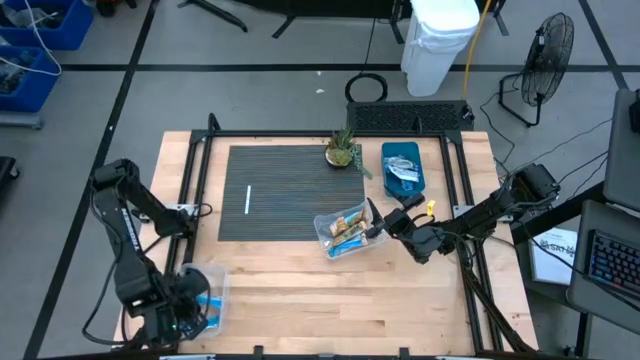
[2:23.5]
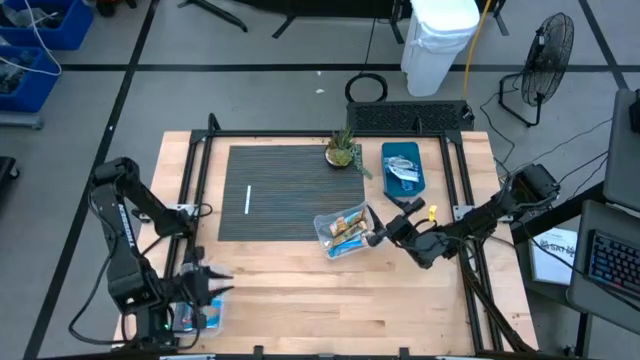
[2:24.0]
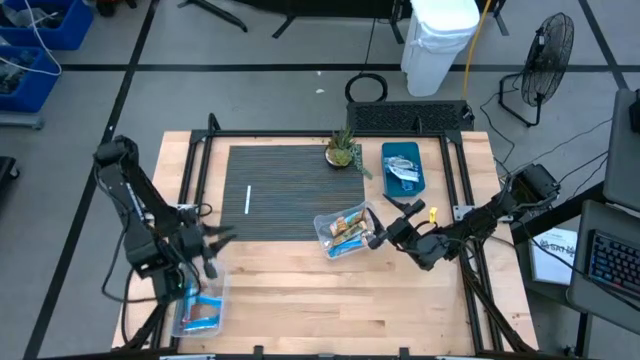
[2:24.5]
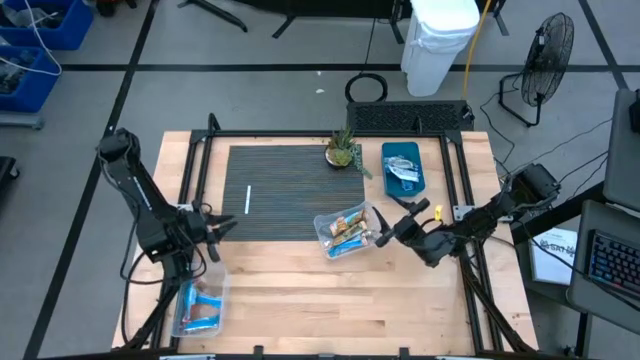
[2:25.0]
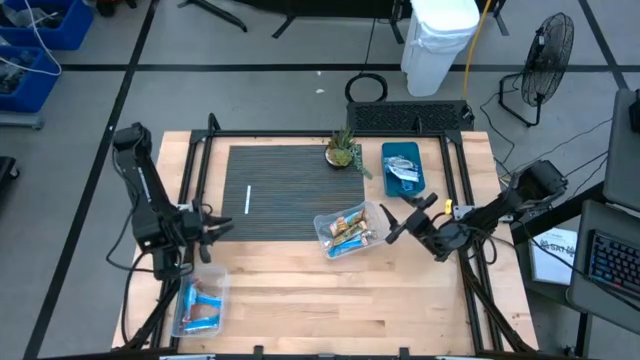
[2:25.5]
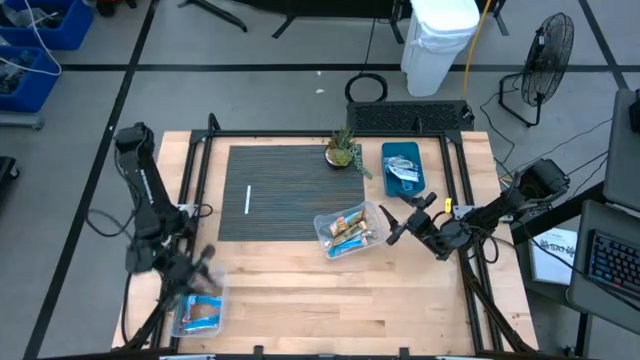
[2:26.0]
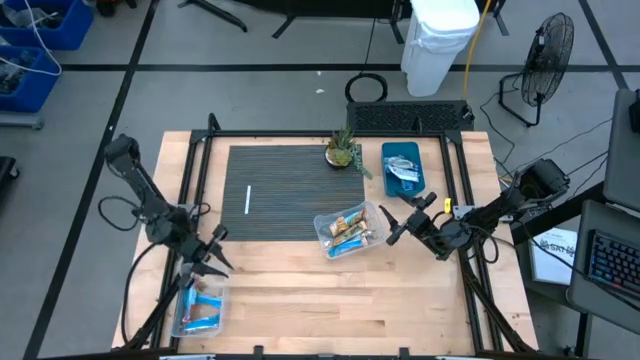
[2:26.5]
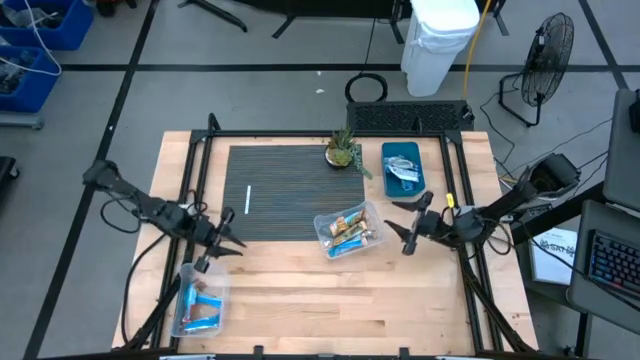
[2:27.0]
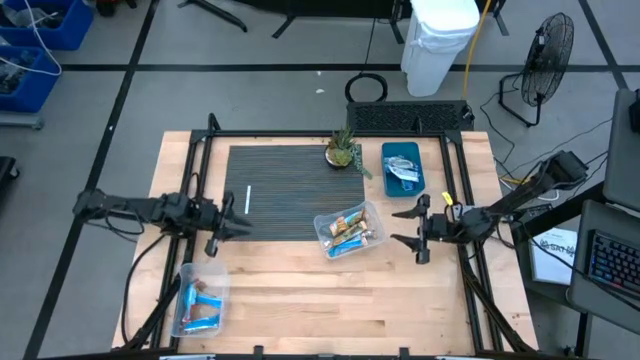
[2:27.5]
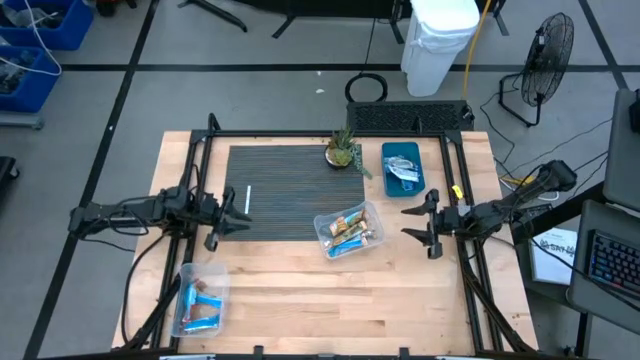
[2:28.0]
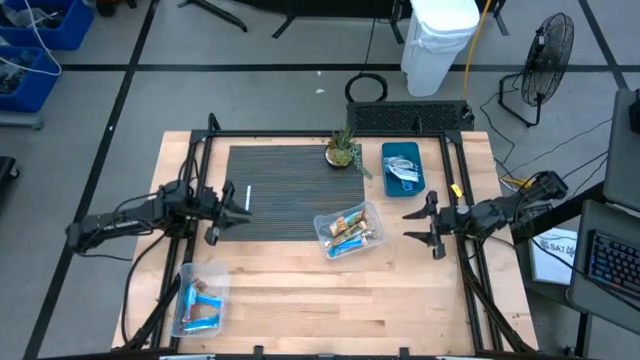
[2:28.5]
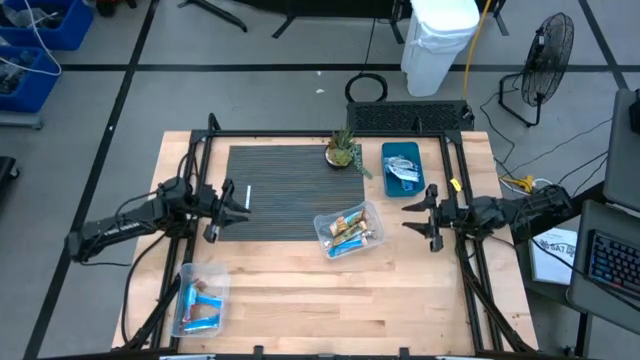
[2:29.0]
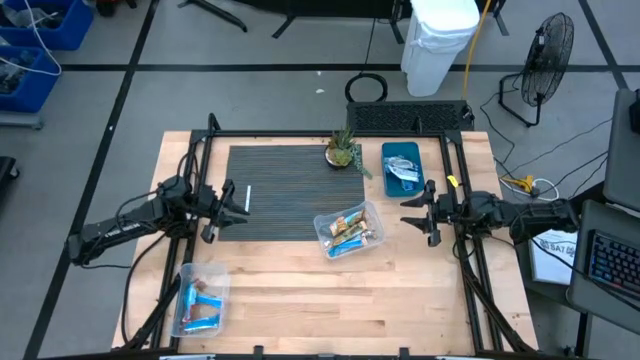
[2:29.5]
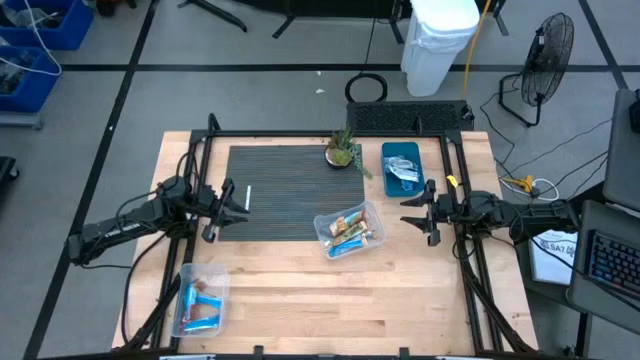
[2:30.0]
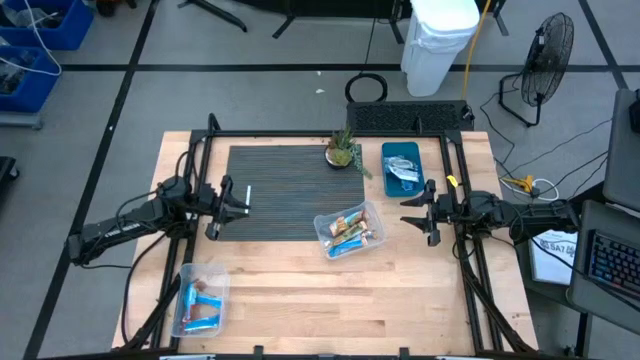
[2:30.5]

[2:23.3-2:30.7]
Task: Pick and place Granola Bars by type
Return to Home Position

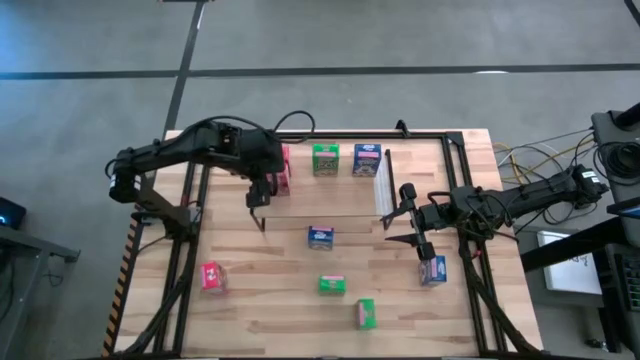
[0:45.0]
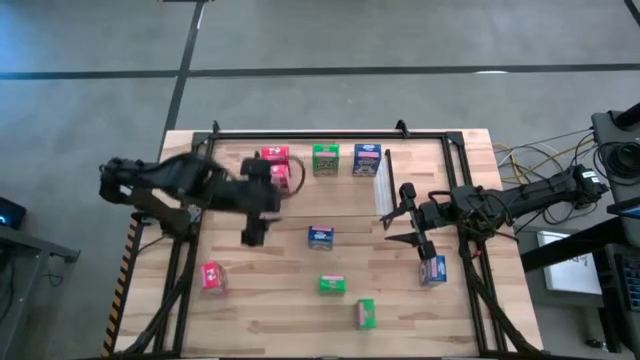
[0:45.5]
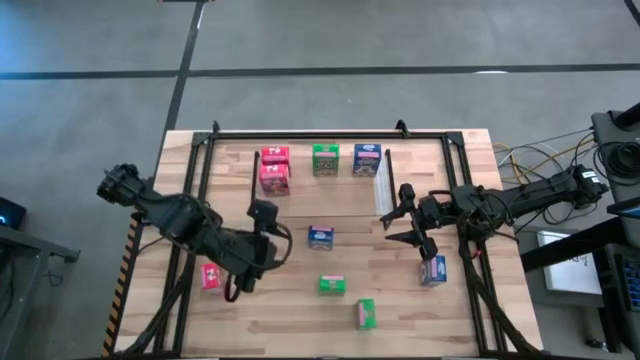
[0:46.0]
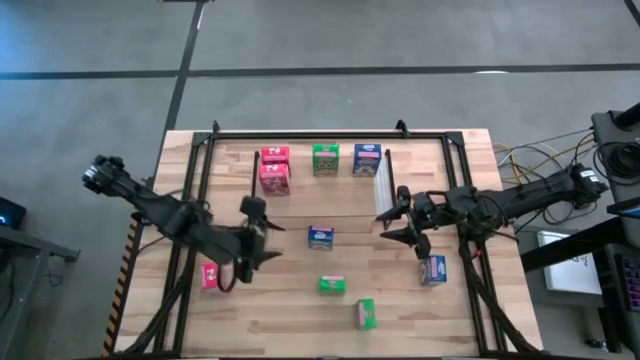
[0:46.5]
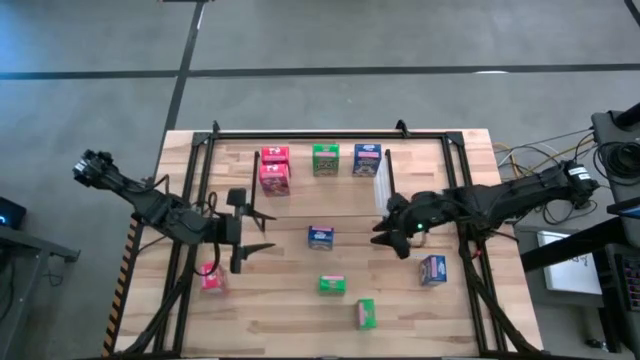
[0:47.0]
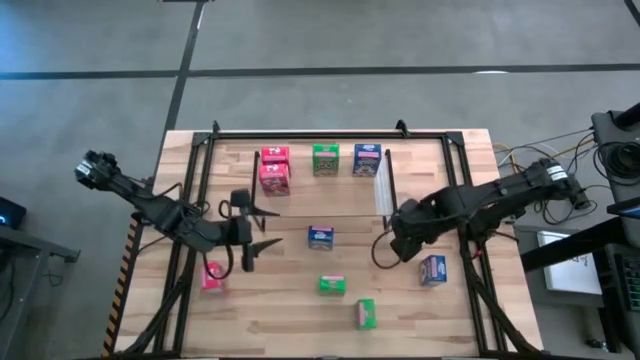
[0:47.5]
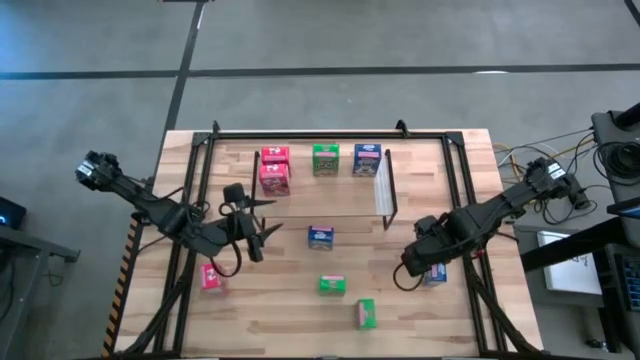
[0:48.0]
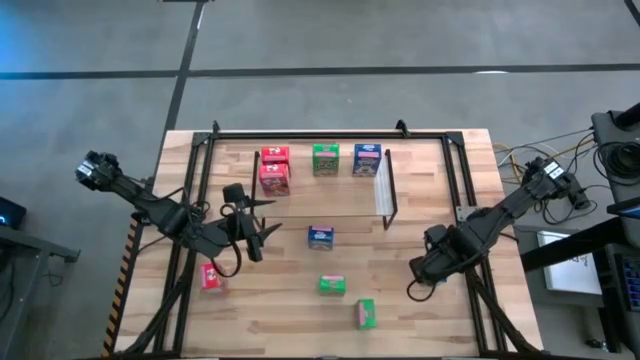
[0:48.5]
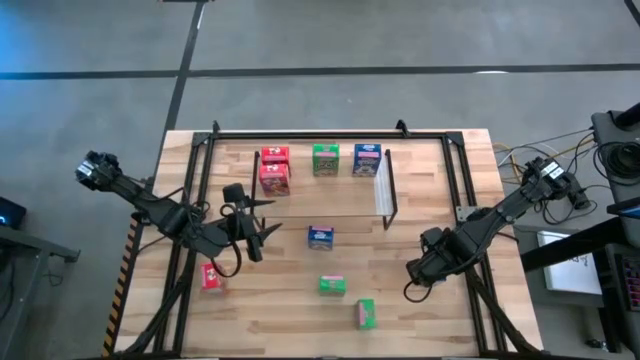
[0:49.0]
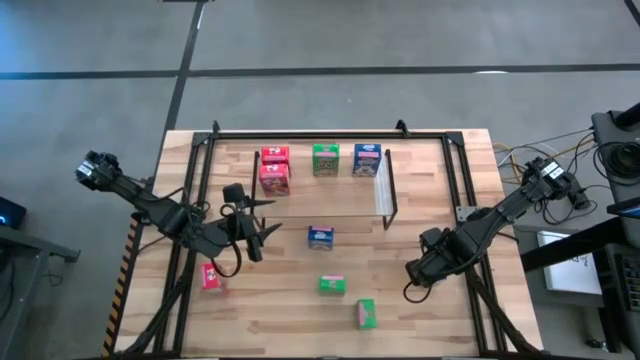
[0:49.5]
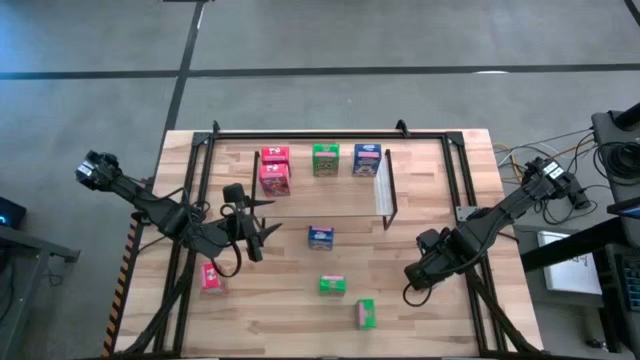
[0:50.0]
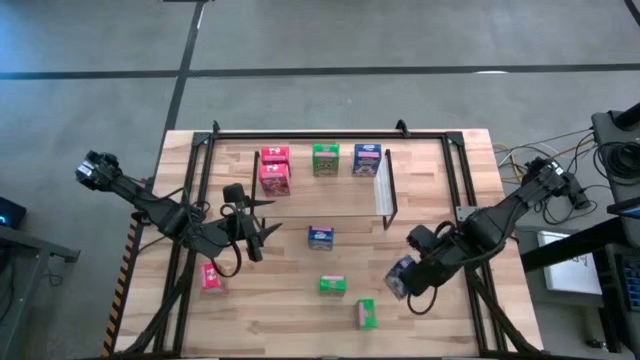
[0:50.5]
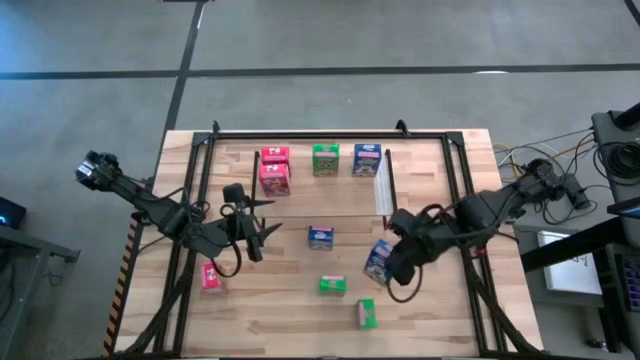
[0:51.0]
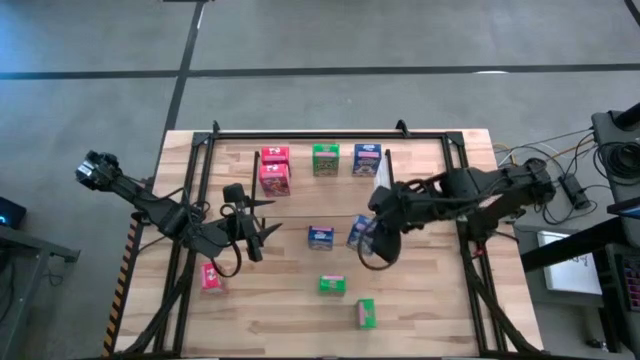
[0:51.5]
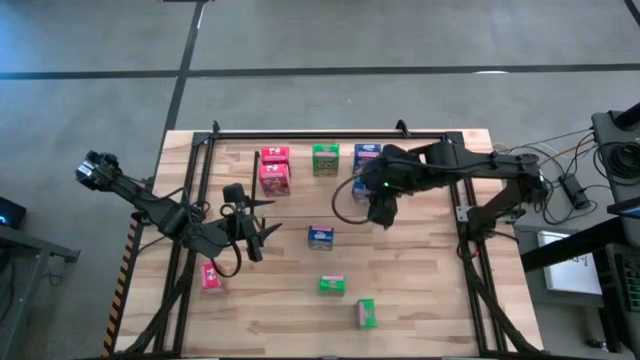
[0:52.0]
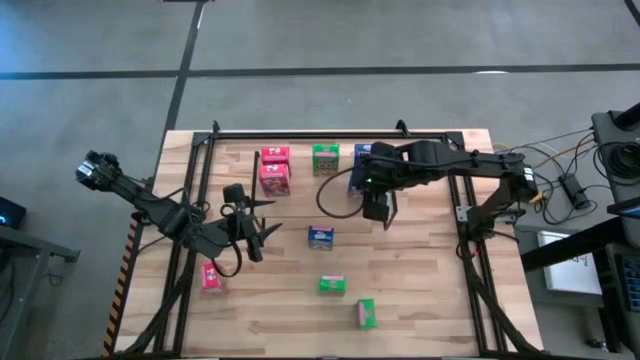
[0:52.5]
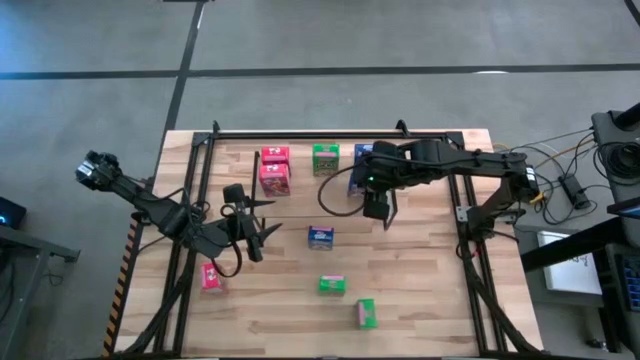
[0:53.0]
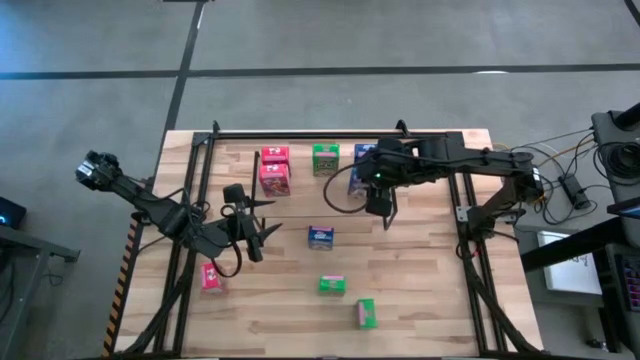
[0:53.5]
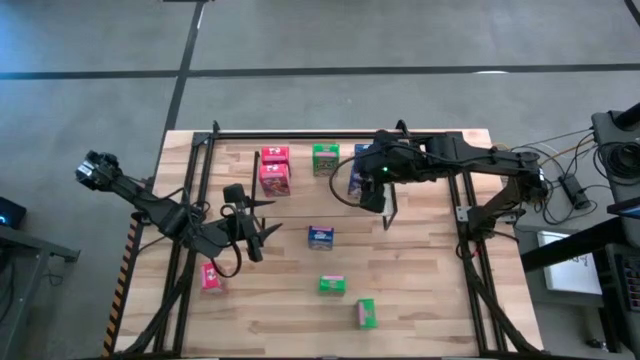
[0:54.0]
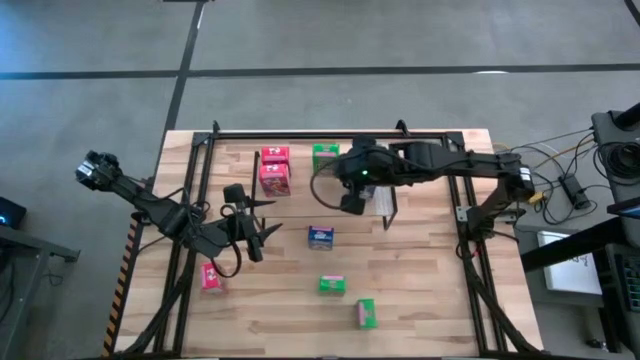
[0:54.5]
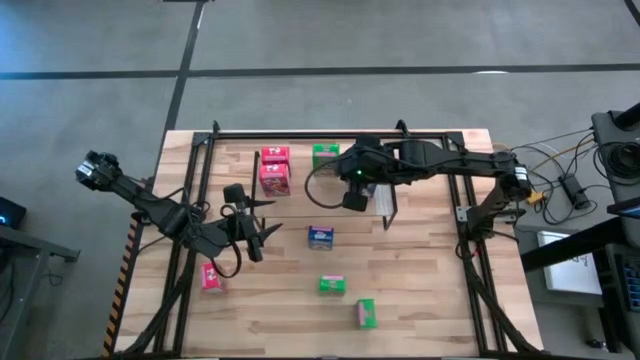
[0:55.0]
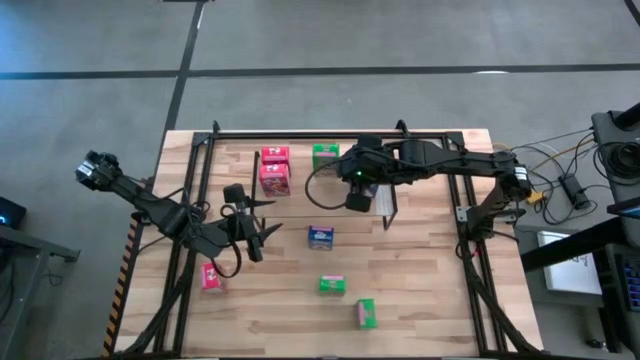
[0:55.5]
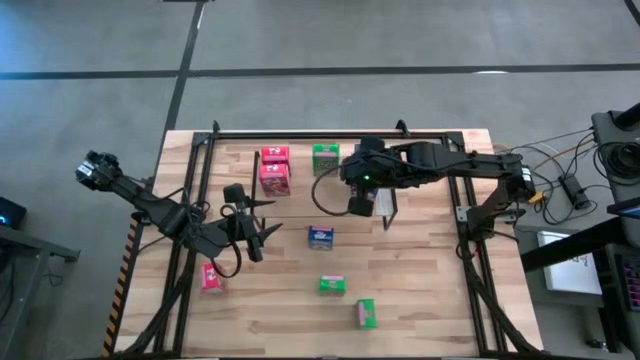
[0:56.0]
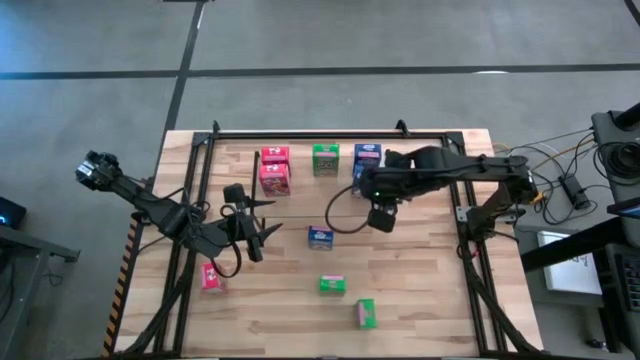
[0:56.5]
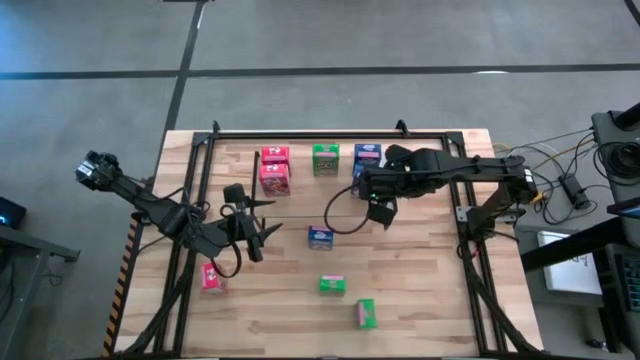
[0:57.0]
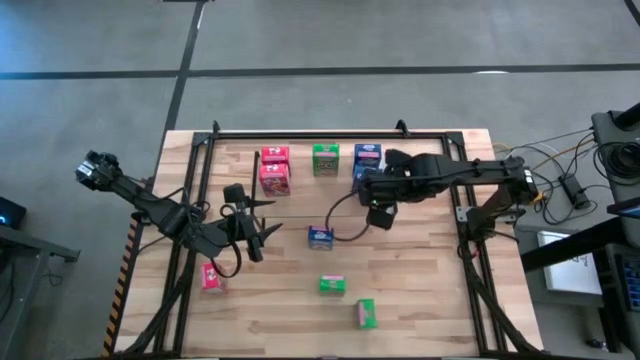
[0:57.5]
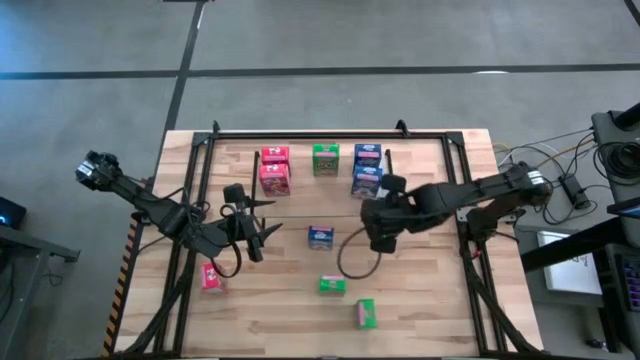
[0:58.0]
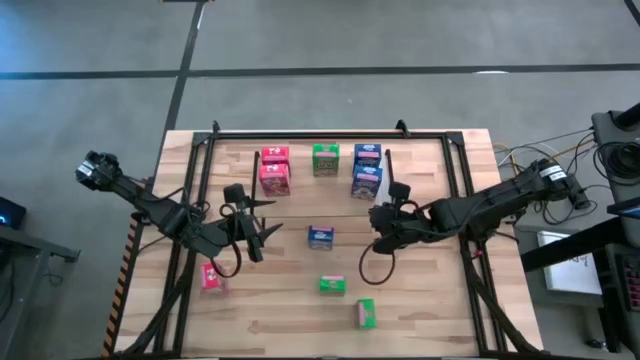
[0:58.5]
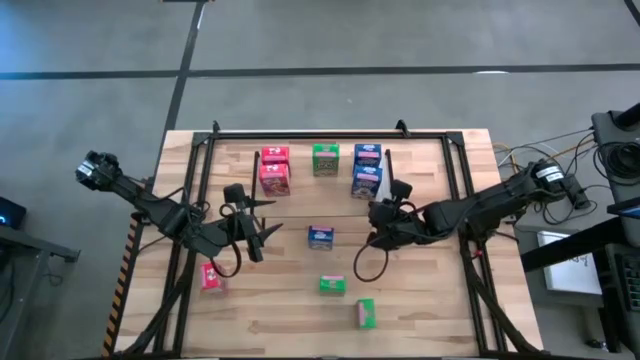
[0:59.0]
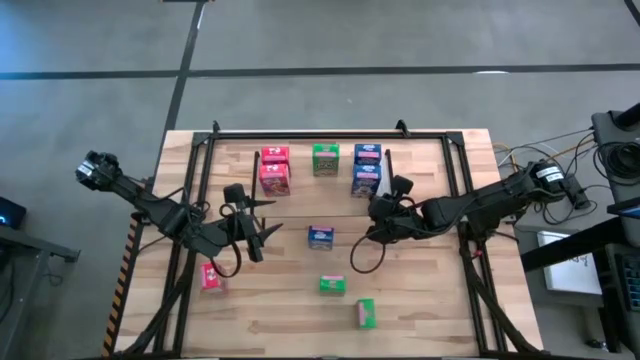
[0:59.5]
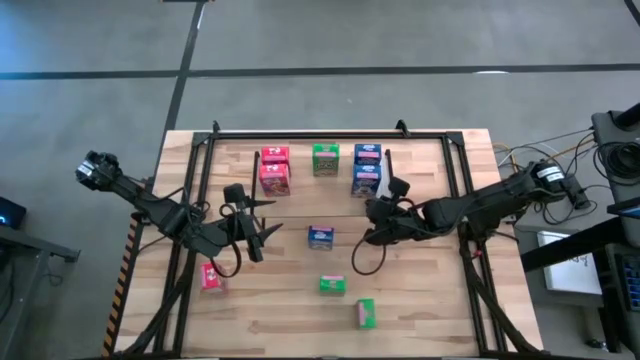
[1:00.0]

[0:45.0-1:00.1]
Task: Stack cereal on shelf
Put the right blue cereal box on the shelf, aligned with the other blue cereal box
